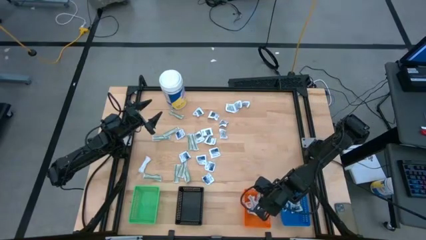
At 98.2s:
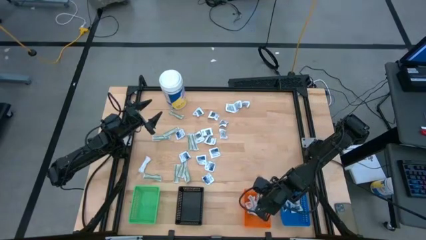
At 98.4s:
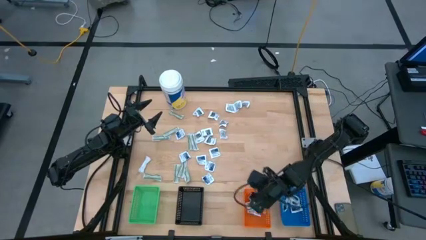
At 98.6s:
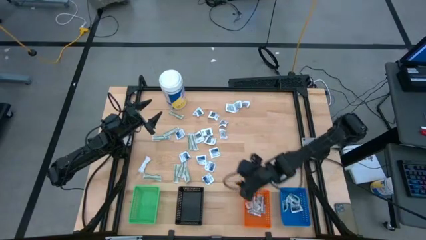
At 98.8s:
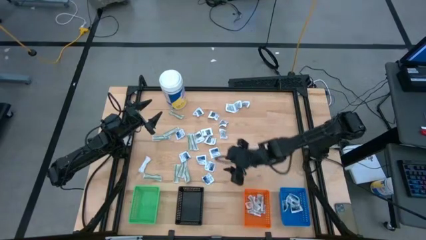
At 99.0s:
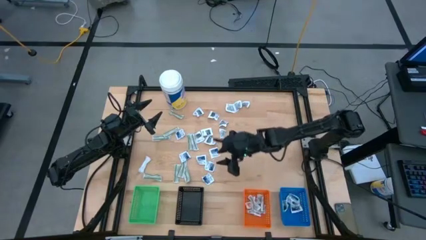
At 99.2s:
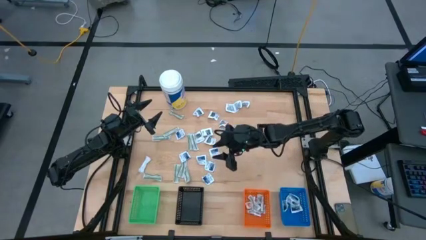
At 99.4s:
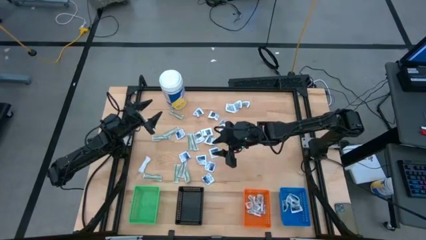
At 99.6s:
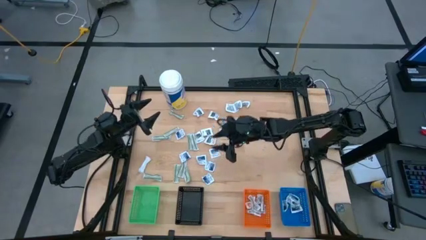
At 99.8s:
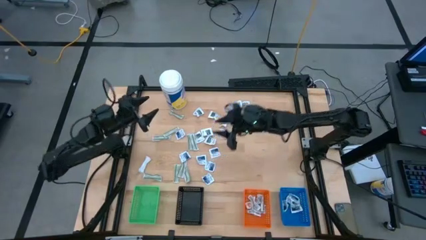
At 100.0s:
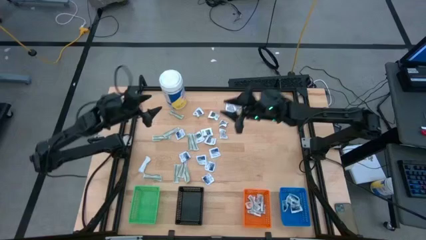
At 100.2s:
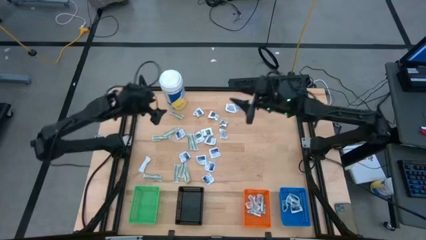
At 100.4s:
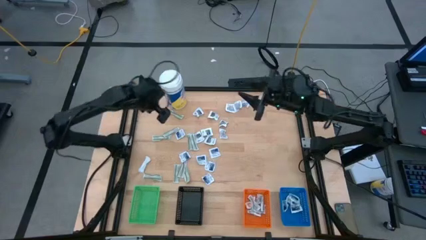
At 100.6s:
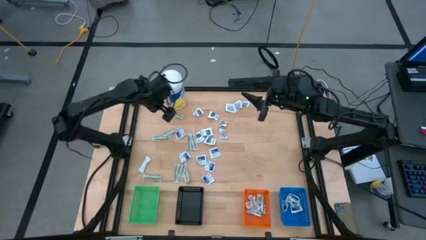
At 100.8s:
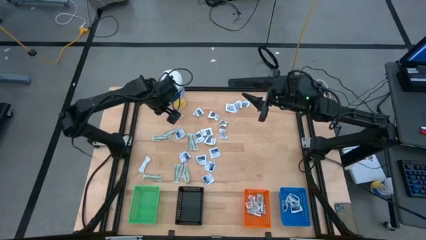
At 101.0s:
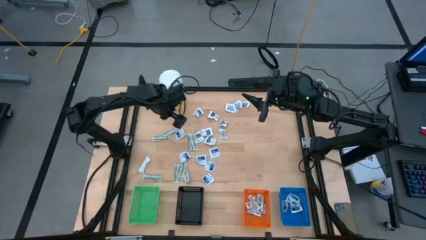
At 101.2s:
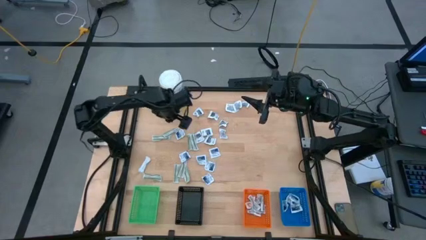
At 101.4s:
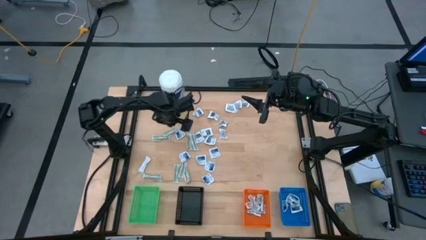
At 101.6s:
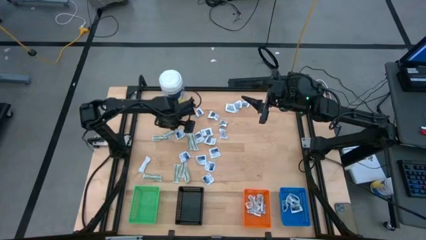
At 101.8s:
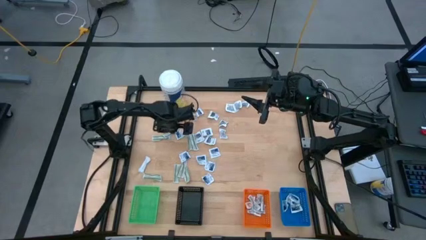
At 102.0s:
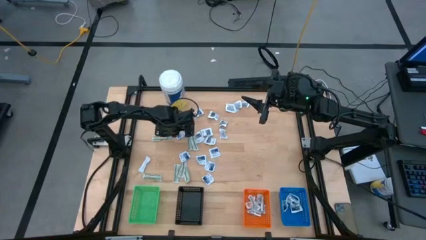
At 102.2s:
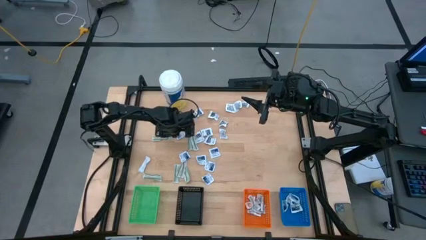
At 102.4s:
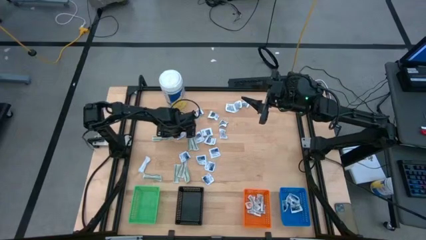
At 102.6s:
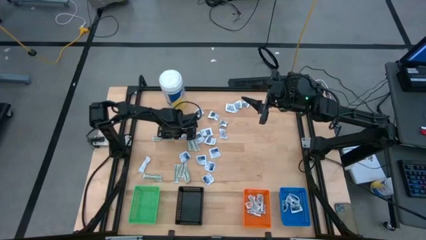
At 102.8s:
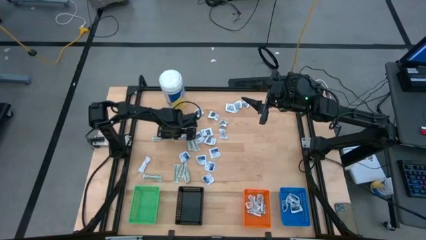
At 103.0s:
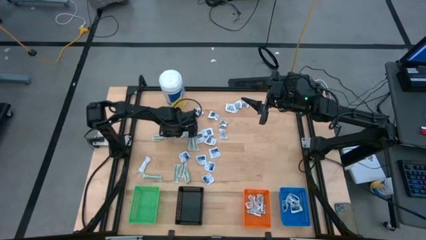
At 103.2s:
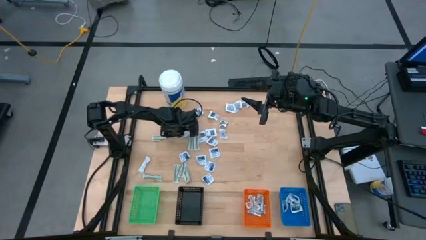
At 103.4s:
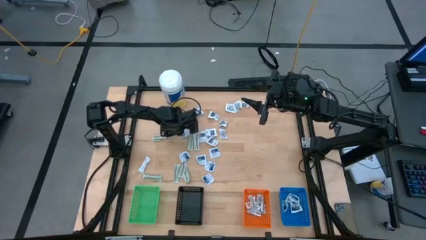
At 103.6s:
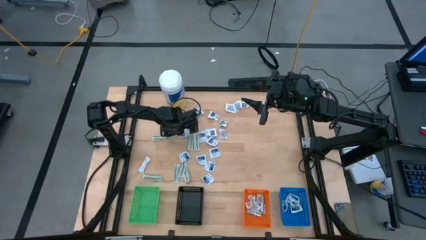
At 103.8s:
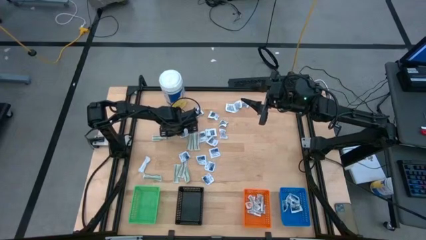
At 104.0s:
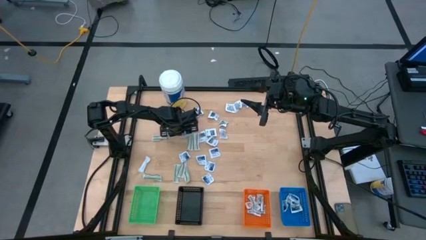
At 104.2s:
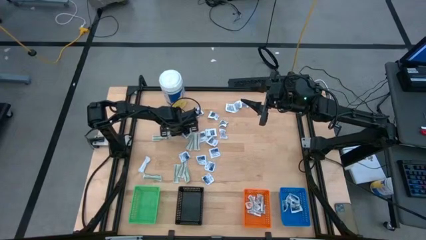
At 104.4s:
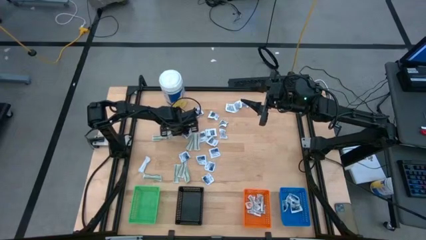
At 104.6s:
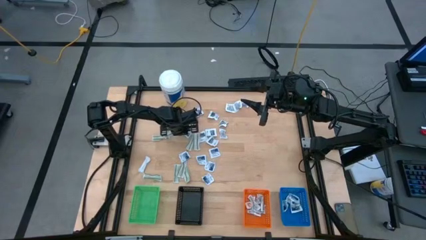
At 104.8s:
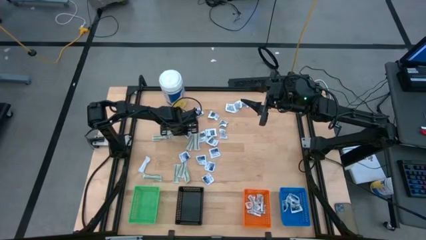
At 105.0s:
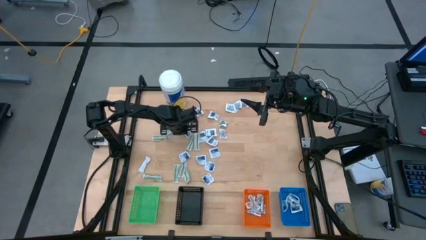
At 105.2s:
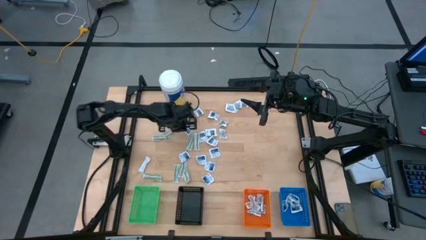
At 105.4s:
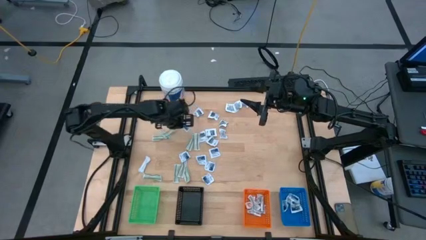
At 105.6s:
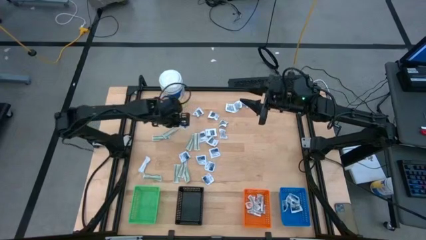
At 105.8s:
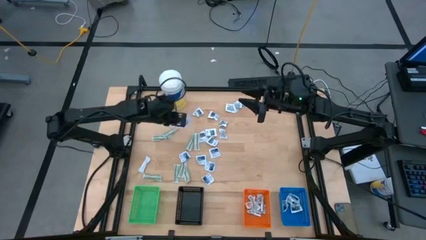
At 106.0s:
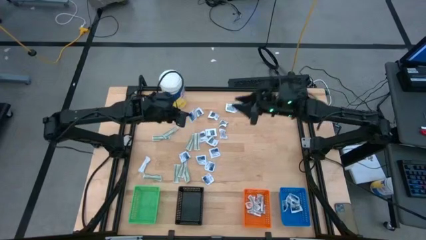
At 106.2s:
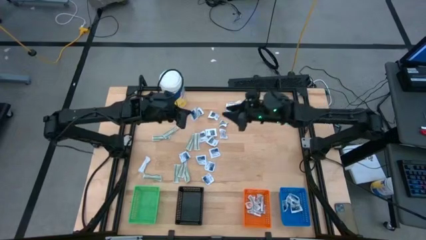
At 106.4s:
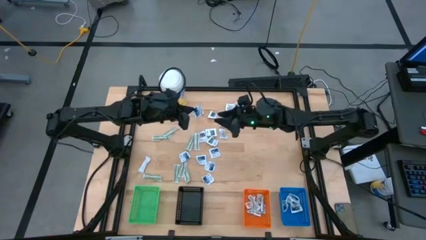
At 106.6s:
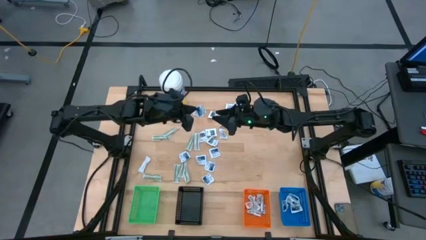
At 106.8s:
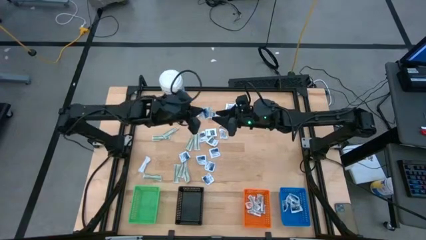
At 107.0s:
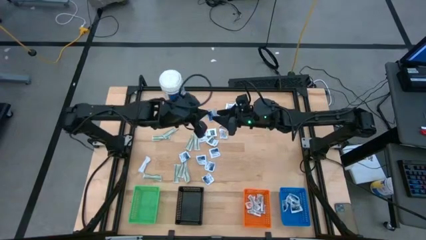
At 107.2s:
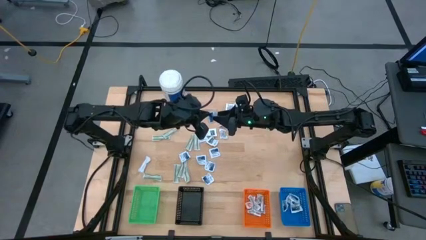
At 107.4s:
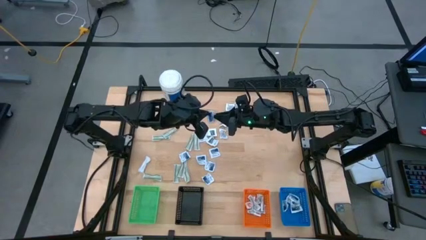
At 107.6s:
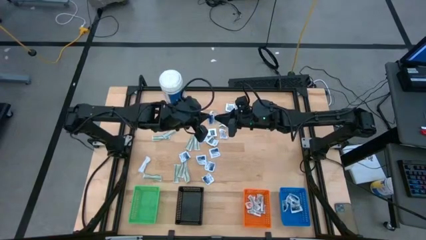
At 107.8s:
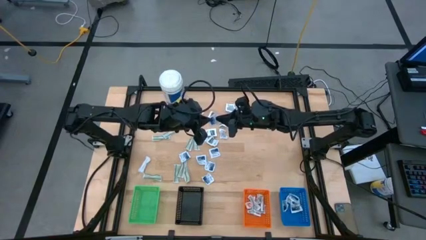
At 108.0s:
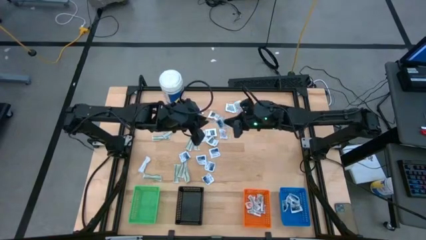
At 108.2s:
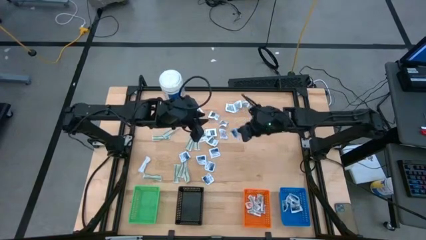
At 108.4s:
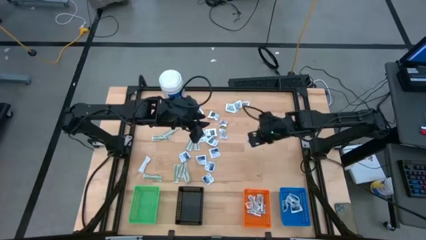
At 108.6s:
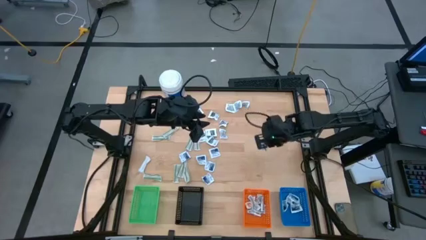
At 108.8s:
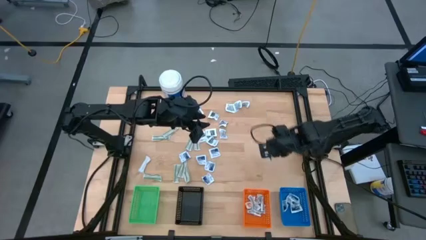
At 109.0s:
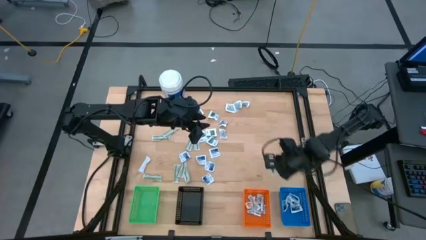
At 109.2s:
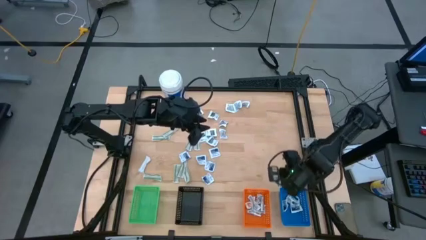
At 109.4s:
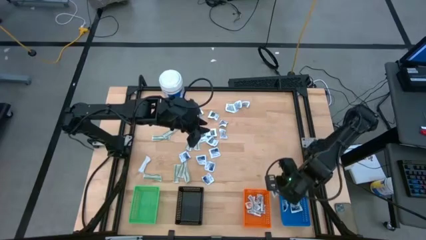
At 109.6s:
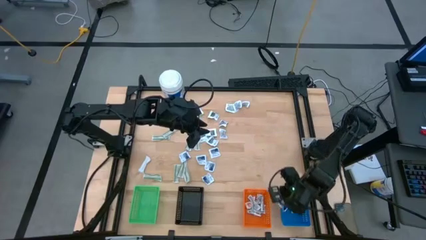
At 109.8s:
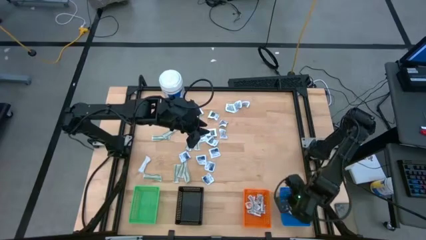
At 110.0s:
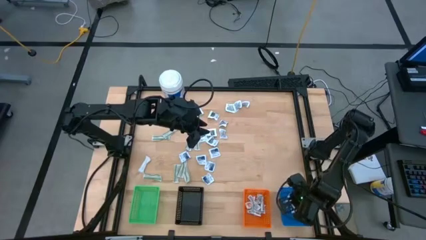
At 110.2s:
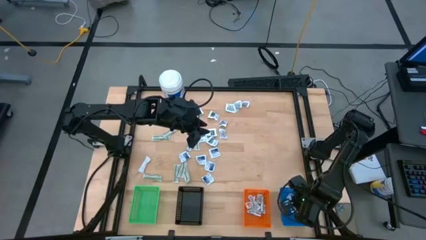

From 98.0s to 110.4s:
Task: Pick & Place First Aid Supplies
Put the alcohol pad into the blue bin

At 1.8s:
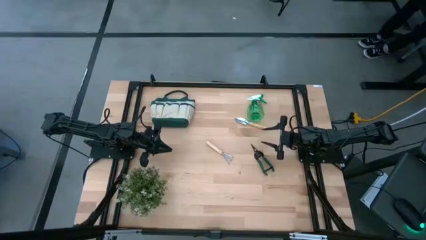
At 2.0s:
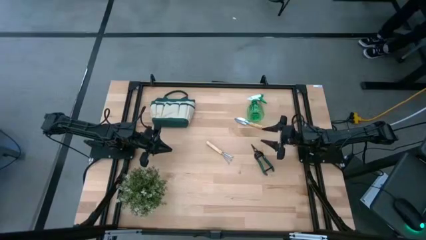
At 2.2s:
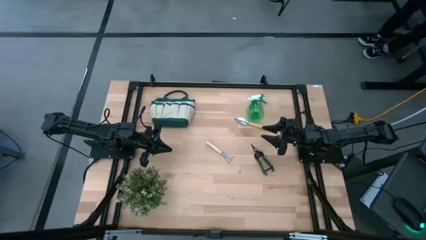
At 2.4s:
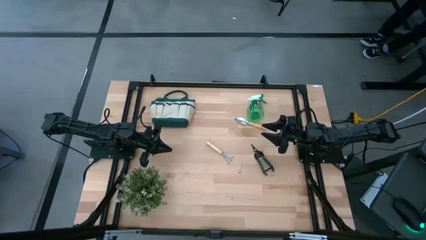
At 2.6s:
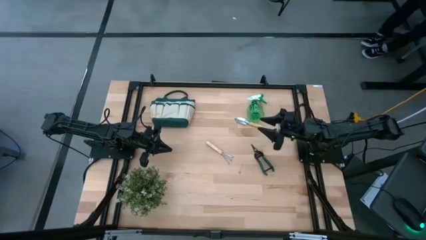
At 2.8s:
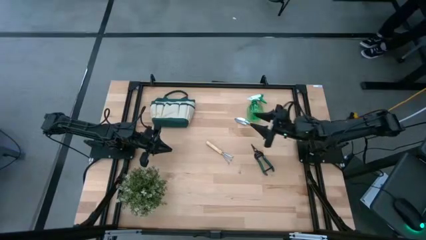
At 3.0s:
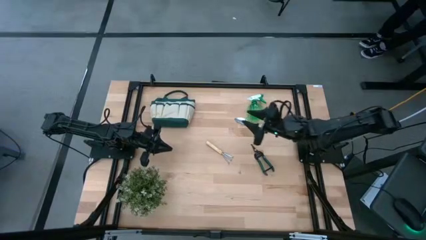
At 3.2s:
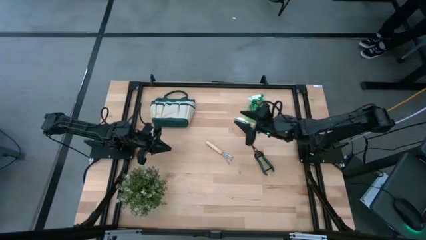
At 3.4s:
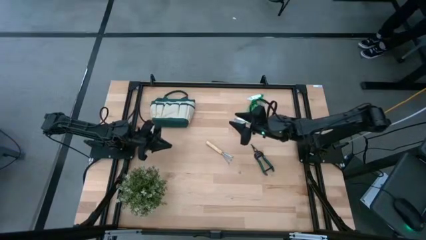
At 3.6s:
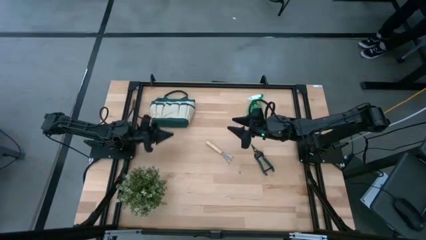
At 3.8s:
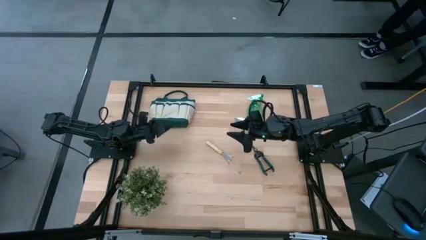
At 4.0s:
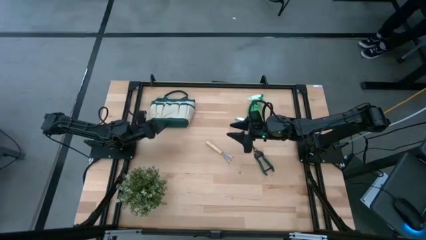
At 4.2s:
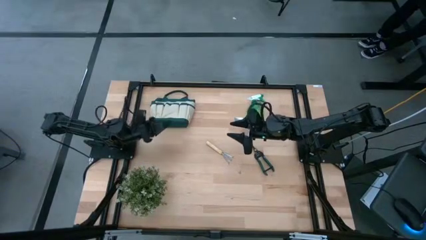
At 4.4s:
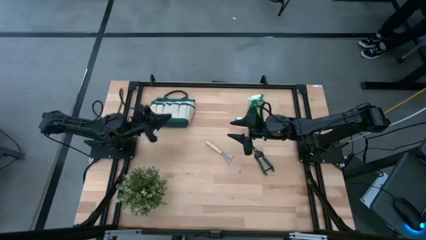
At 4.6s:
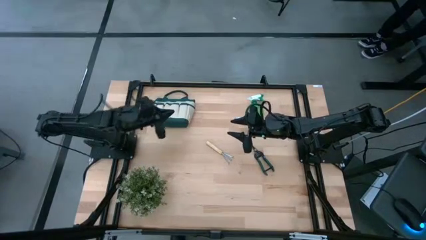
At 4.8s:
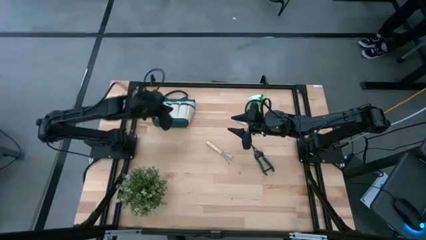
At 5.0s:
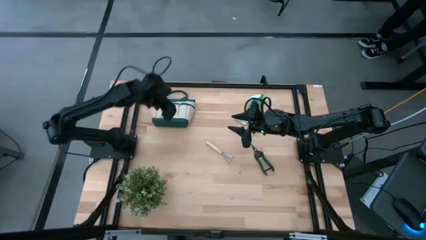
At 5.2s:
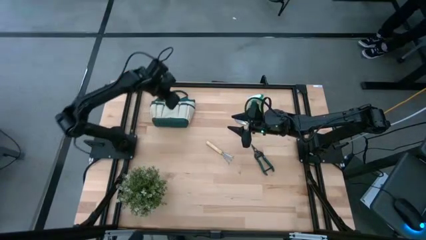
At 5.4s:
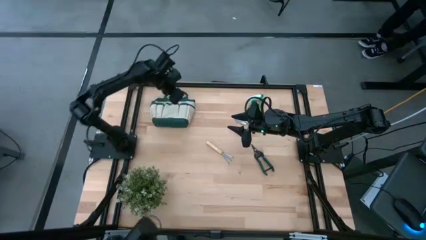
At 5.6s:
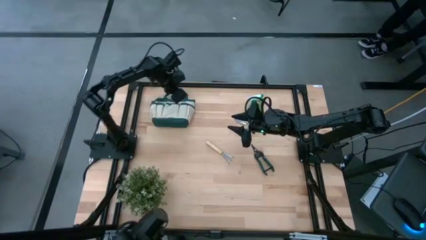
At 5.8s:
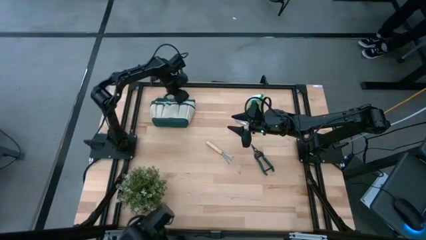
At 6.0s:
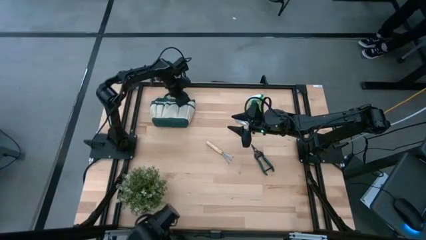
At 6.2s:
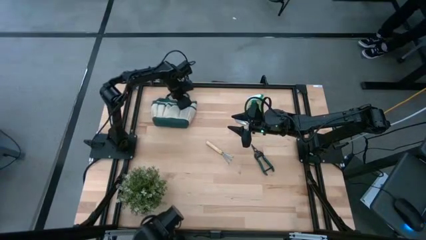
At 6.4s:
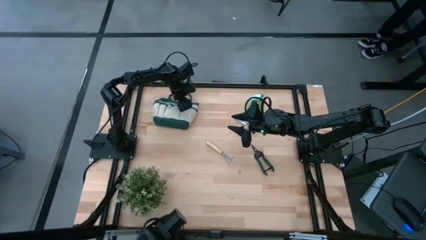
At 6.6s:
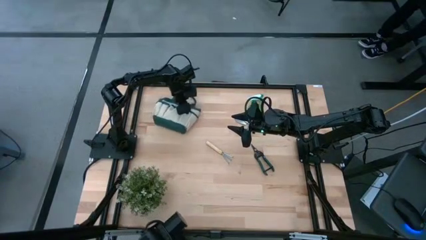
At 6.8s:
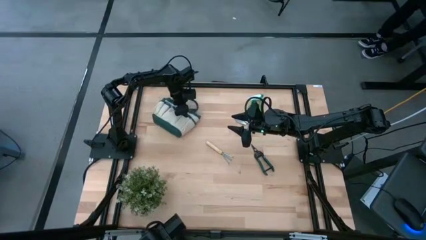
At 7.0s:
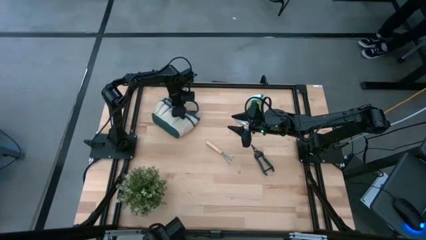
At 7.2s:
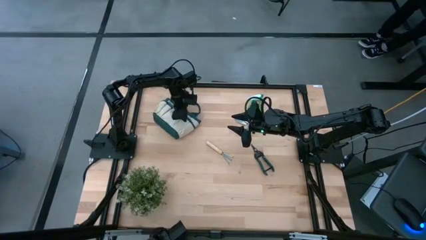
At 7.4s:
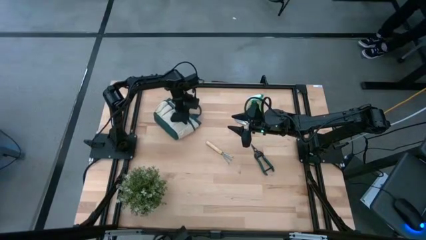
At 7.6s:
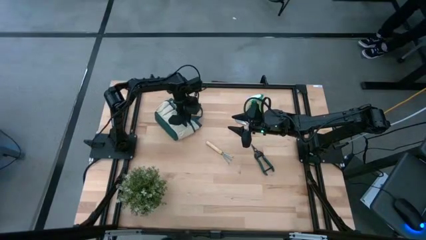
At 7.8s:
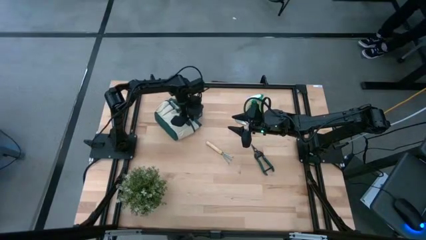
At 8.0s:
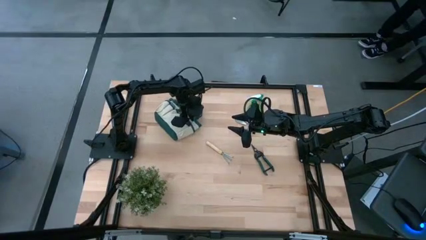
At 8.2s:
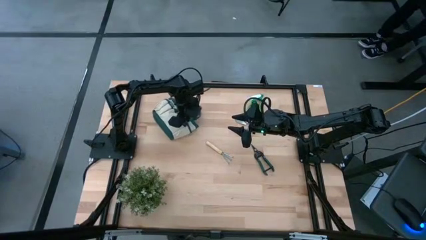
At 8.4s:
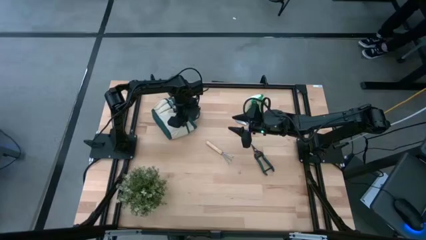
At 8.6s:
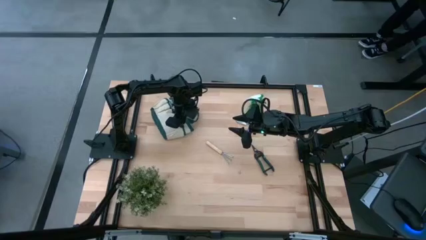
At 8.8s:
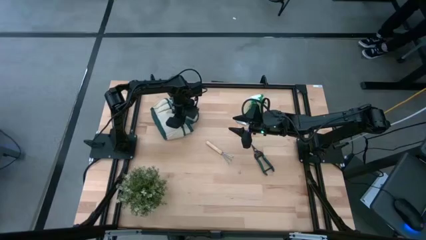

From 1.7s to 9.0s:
Task: Pick & Place Garden tools in Gardening bag
Prepare the gardening bag
